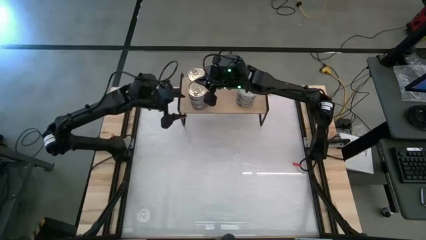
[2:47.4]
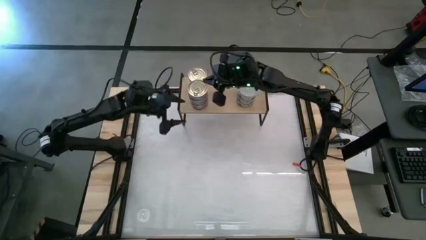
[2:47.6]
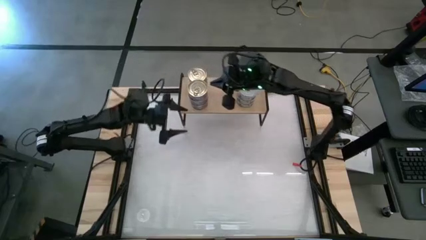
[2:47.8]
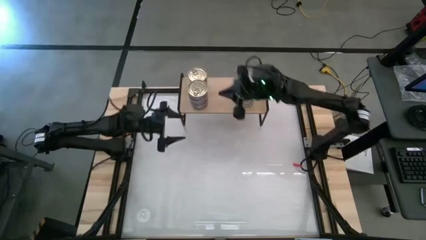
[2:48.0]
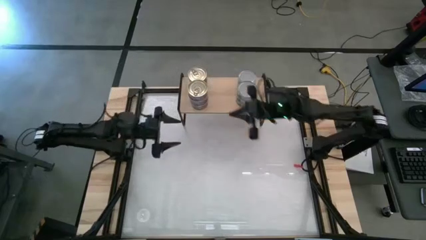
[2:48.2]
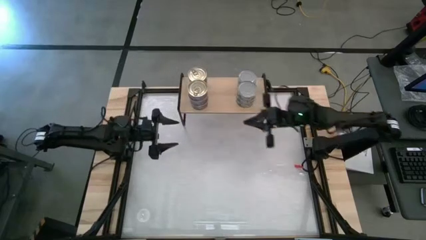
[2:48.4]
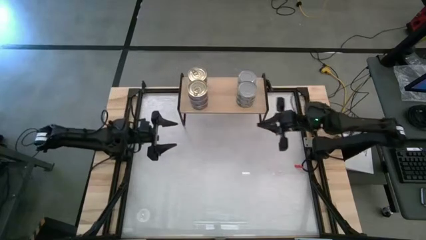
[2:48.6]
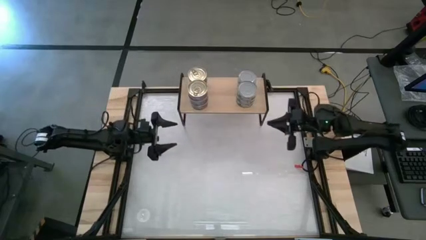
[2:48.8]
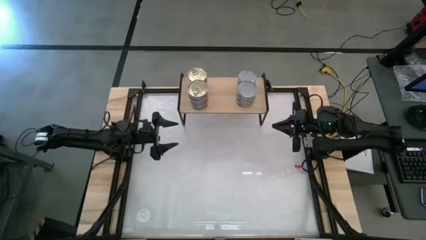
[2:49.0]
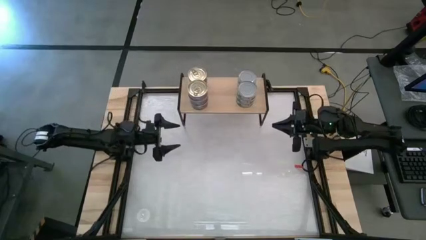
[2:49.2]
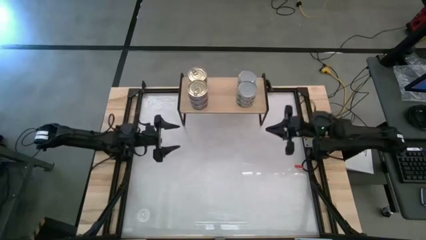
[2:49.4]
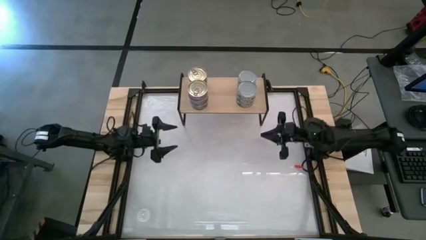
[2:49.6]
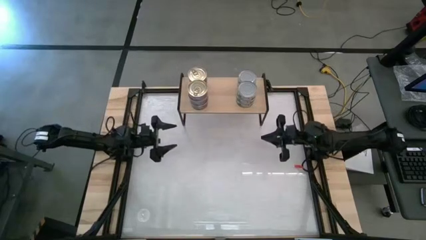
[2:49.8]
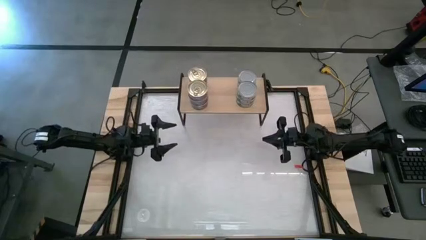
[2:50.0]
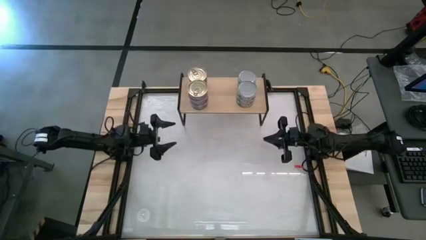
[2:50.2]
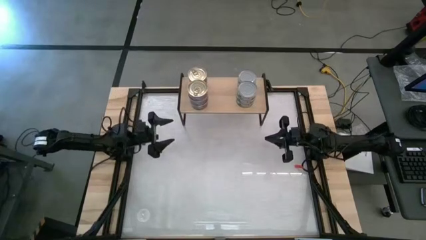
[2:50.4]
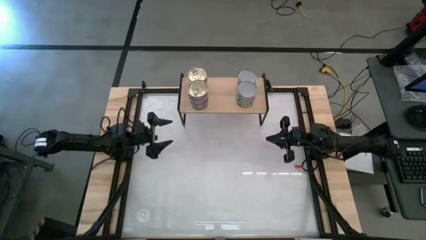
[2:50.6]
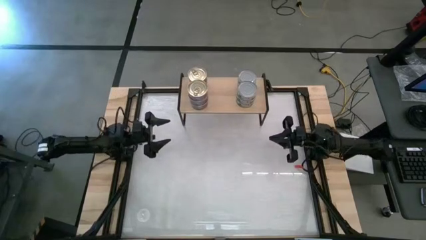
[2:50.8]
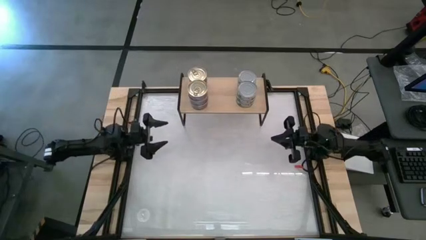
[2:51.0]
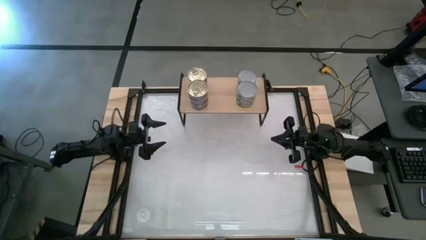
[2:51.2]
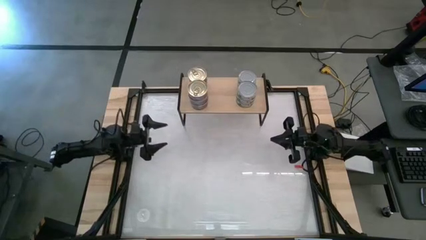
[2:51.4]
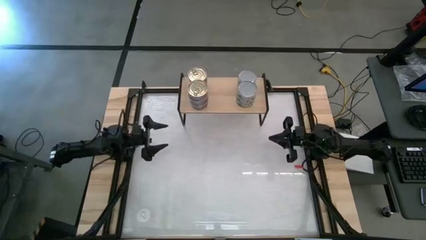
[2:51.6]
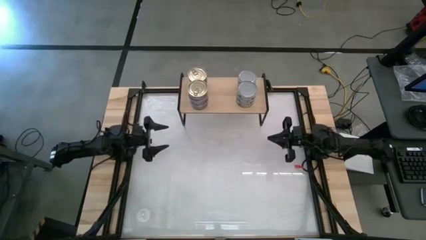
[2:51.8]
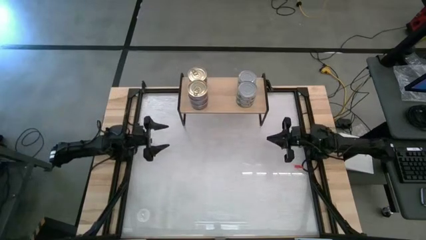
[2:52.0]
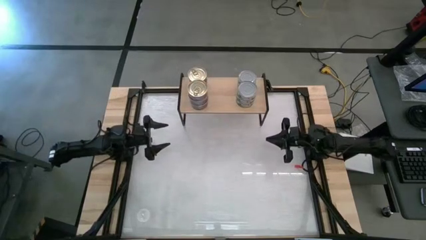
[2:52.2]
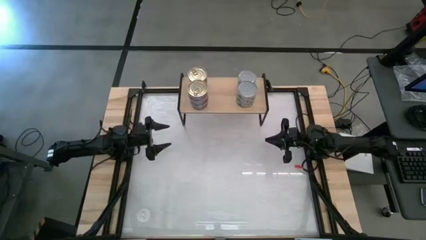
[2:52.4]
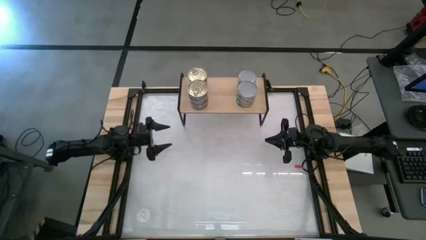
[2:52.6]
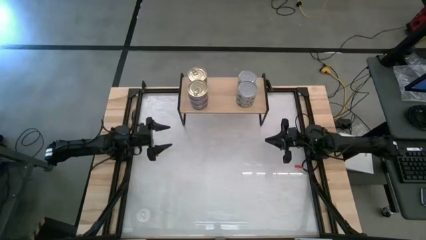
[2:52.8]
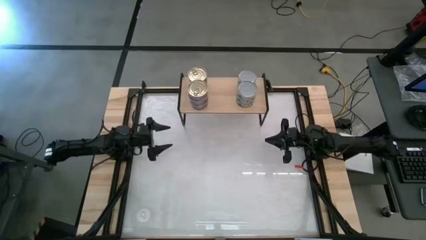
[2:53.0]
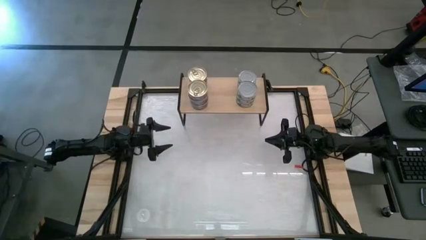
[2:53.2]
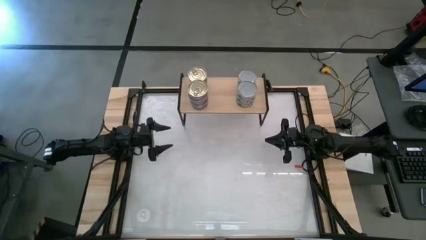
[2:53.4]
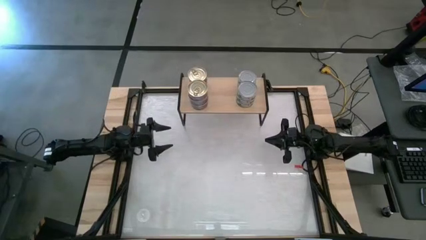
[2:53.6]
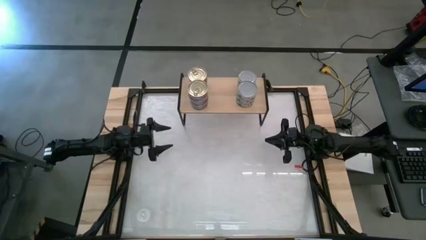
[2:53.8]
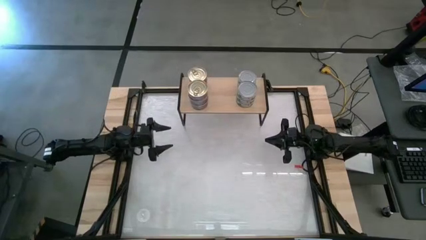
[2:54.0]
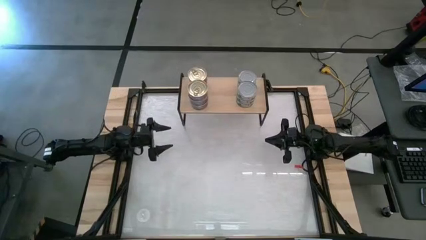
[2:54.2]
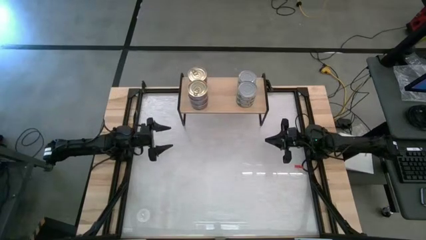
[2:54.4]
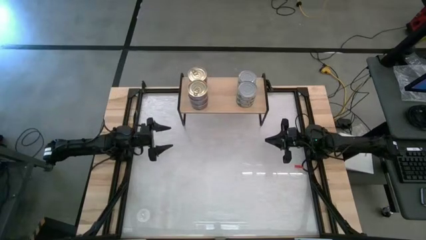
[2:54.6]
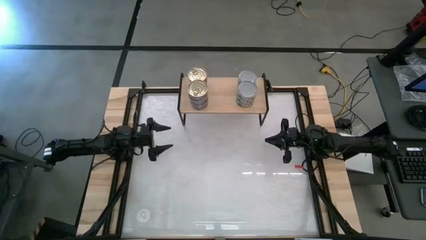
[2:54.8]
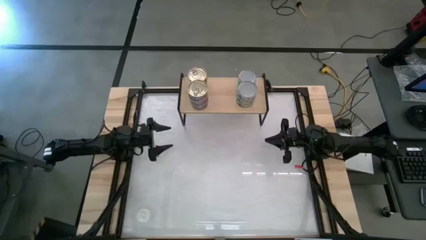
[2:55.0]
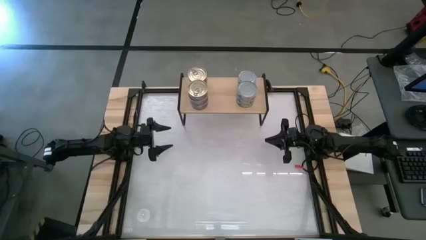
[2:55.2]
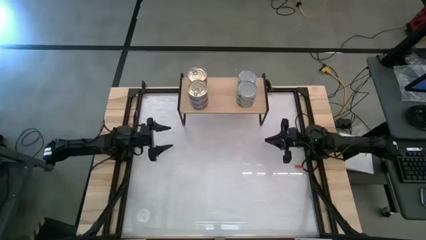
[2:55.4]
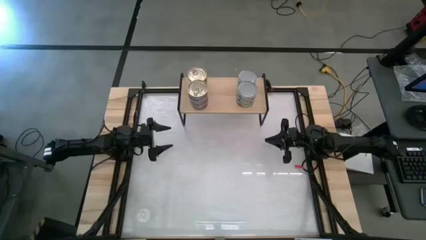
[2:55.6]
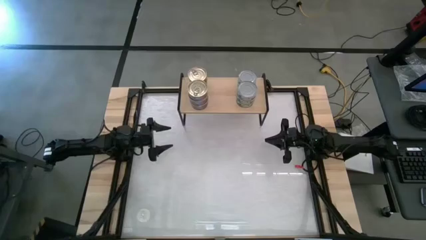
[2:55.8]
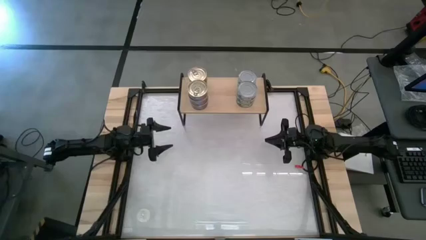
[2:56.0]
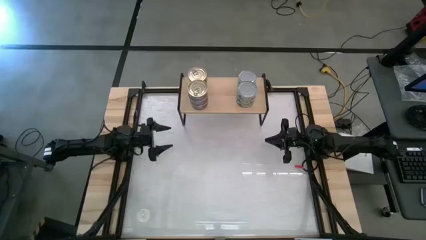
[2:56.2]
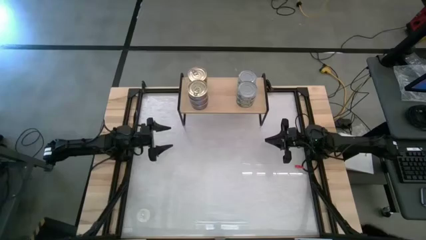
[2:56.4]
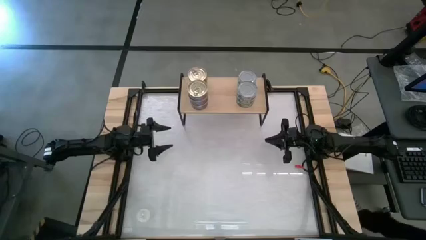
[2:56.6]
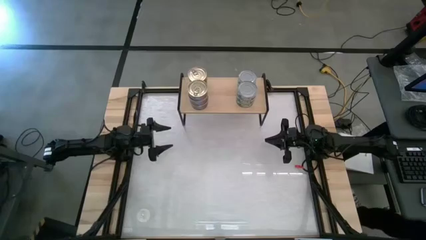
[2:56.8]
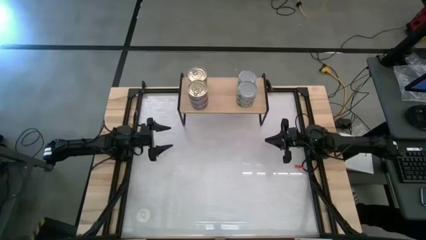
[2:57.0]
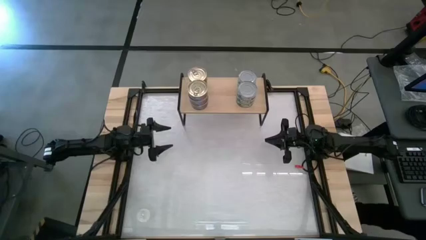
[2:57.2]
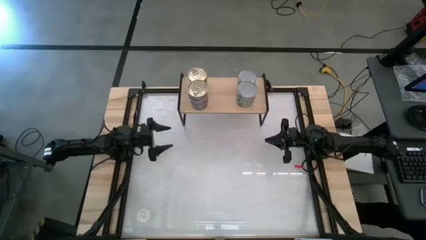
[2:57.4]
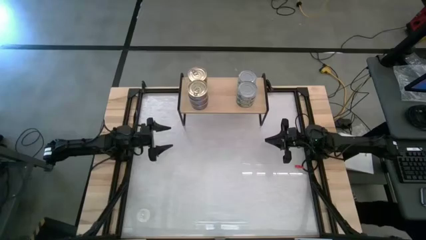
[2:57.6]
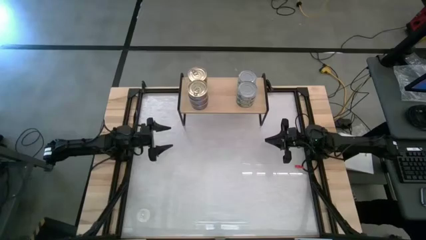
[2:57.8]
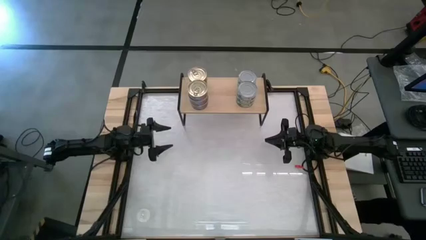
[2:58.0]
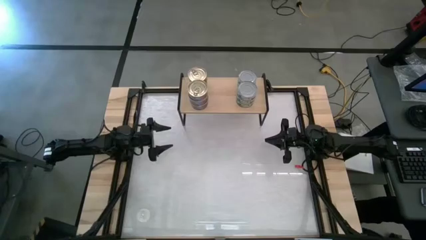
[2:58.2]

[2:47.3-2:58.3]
Task: Stack canned seafood by type on shelf
Return to Home Position

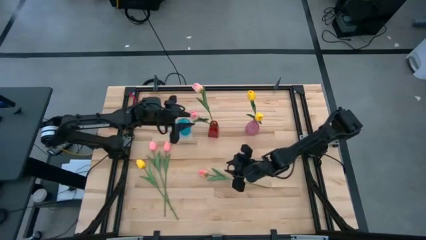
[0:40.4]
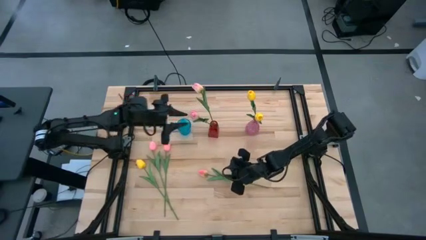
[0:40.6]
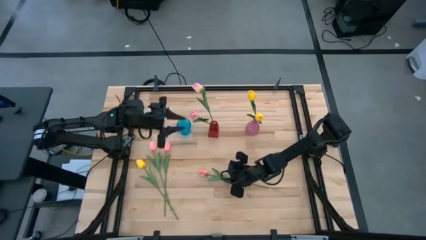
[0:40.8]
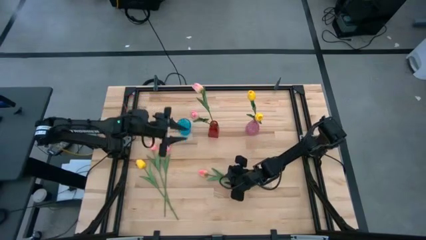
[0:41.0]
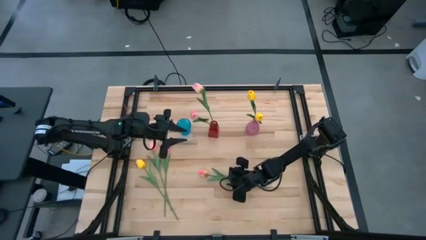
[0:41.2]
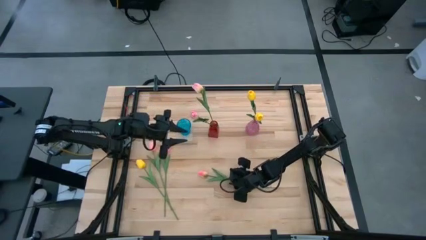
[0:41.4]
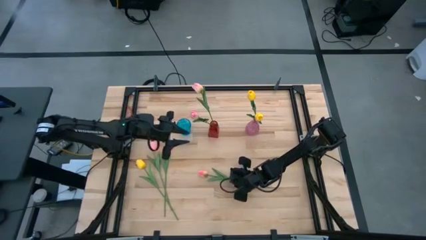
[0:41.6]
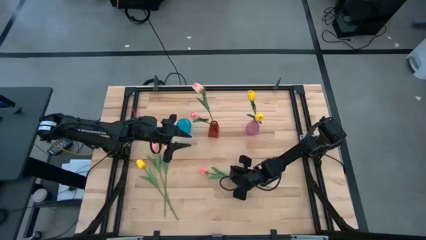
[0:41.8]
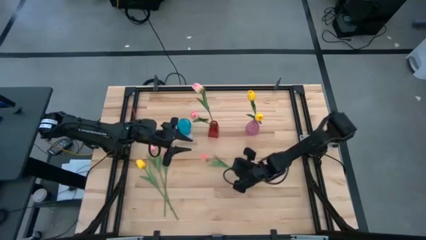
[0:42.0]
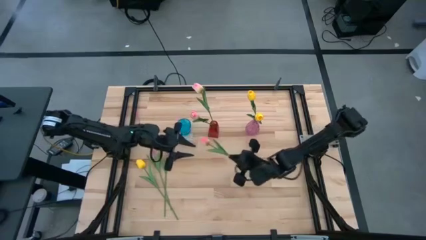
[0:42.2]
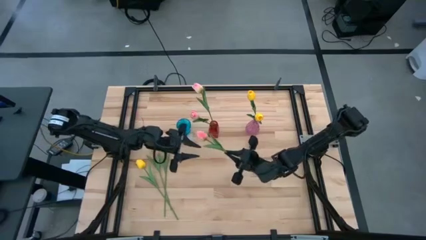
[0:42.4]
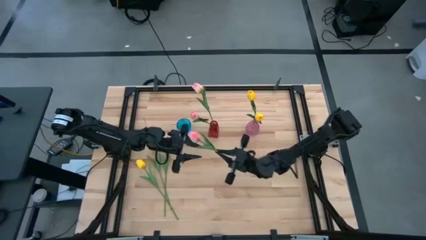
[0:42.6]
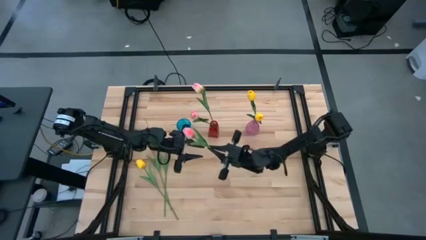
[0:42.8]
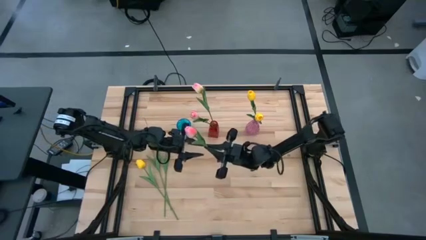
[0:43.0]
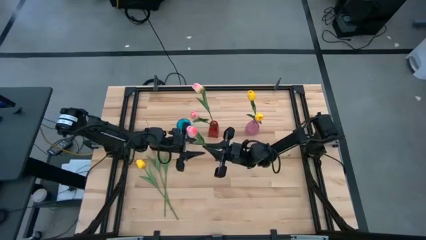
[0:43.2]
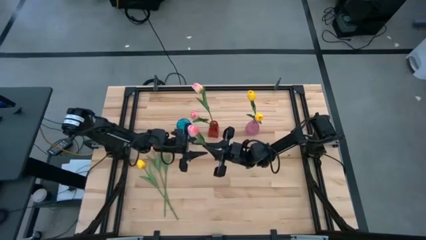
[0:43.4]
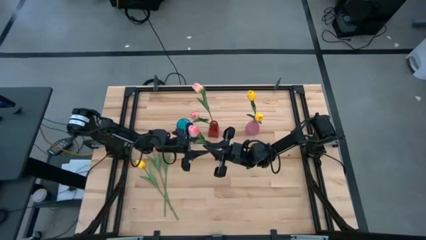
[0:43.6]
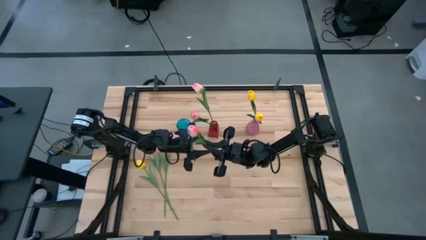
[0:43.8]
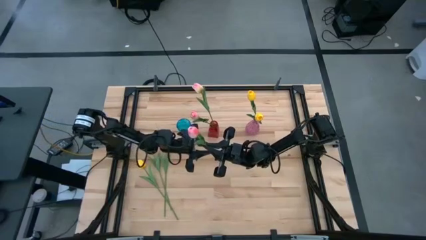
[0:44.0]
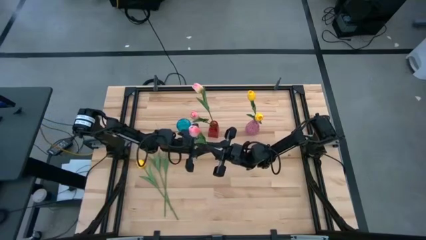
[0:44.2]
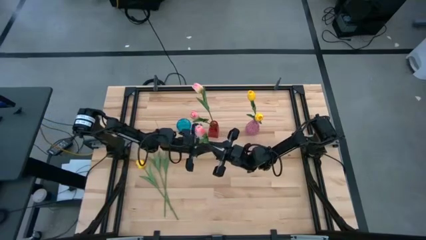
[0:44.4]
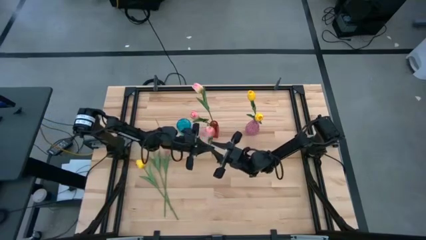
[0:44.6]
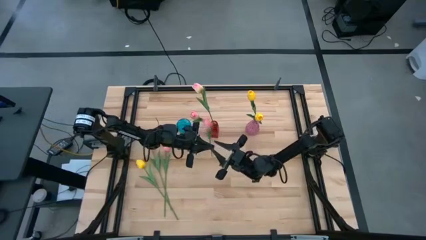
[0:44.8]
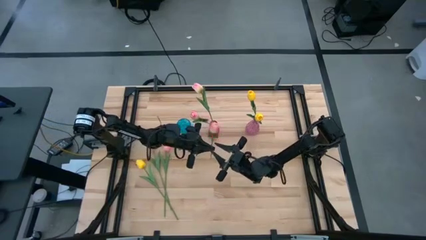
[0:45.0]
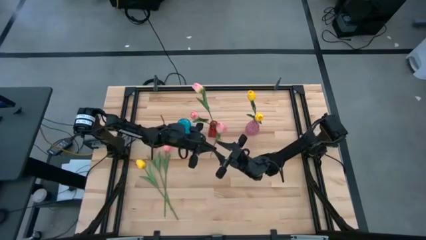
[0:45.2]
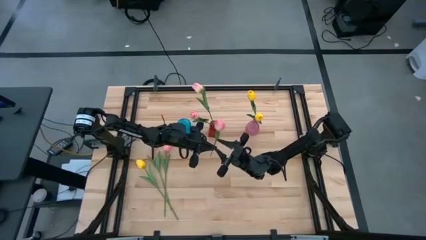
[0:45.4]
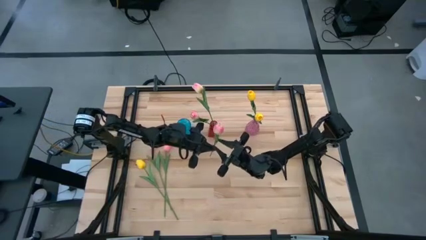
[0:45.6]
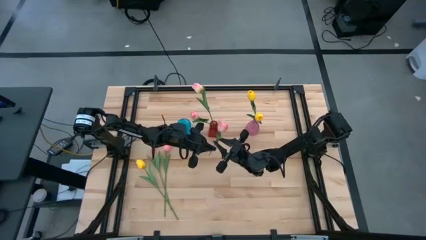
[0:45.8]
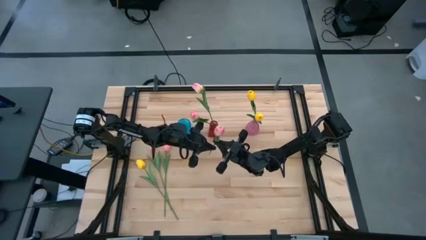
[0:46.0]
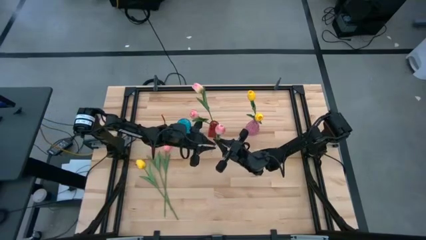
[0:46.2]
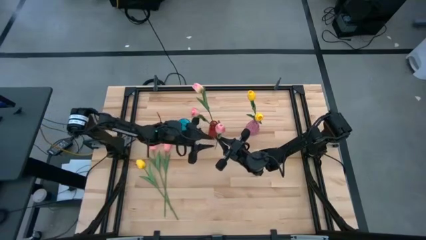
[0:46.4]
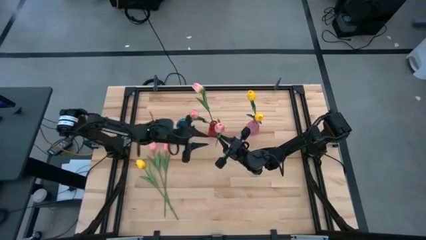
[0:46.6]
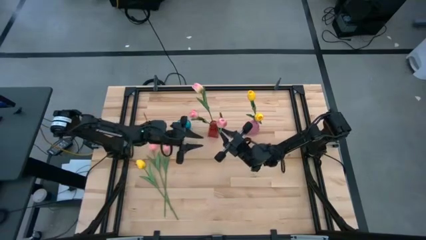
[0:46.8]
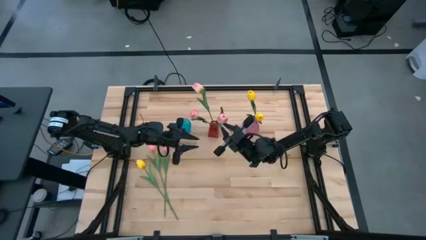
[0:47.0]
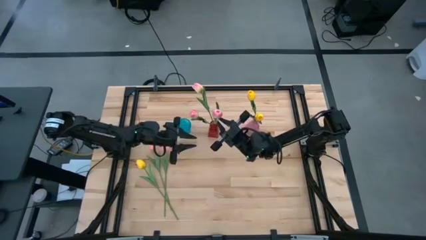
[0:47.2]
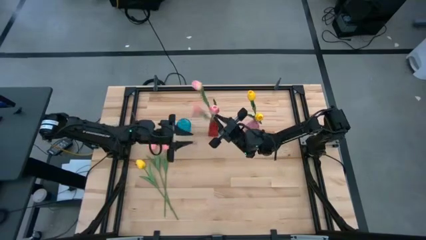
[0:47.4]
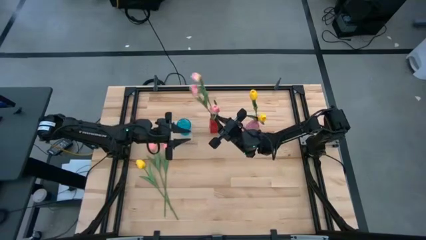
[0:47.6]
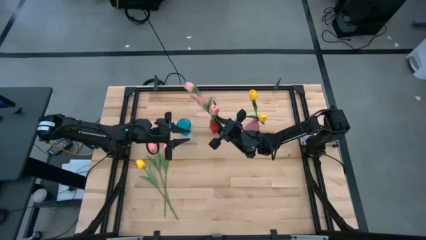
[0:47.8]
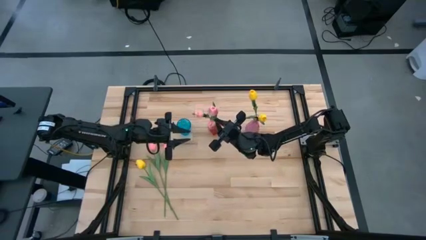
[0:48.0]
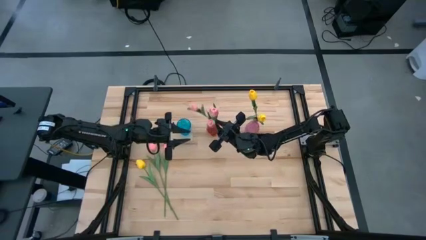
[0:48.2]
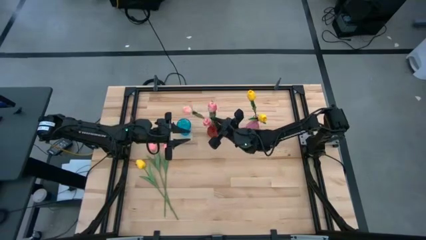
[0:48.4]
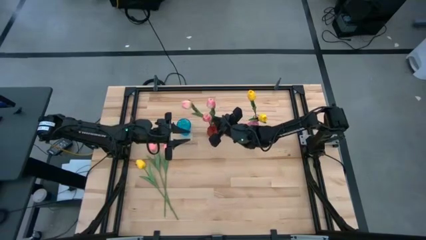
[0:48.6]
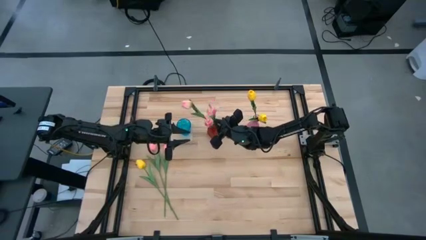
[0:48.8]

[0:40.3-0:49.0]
Task: Sort flowers into vase by color
Put the pink flower into red vase
